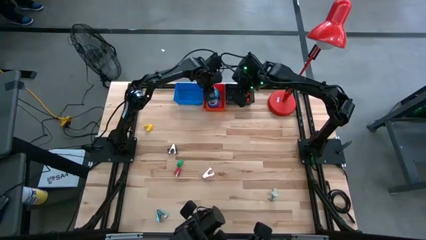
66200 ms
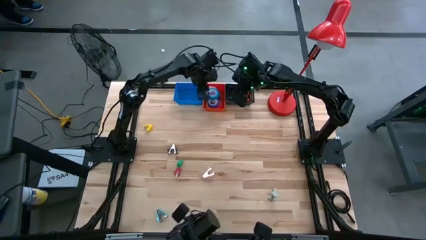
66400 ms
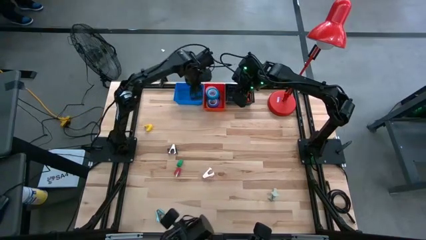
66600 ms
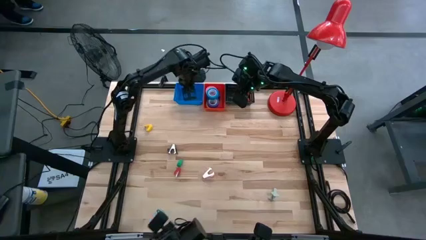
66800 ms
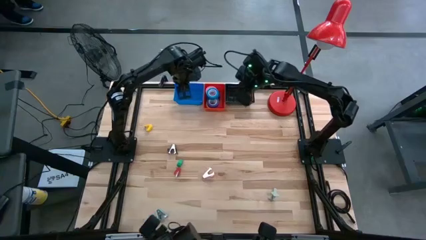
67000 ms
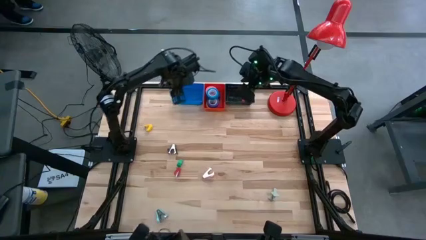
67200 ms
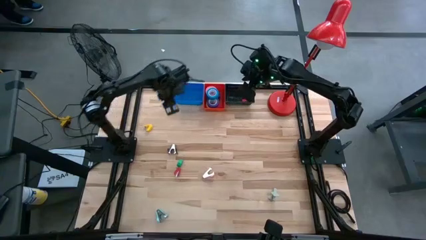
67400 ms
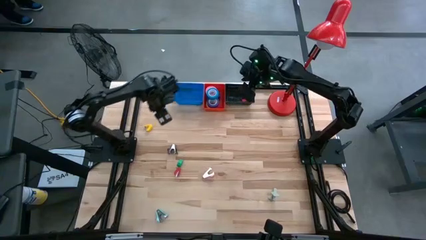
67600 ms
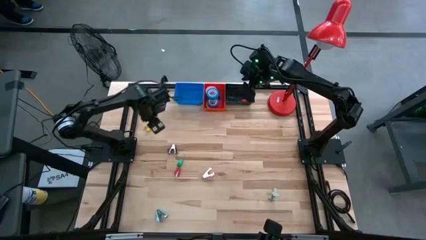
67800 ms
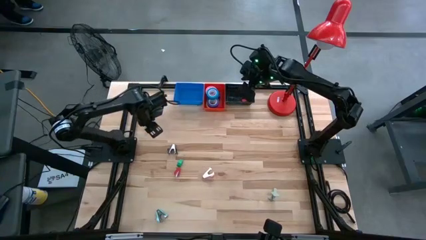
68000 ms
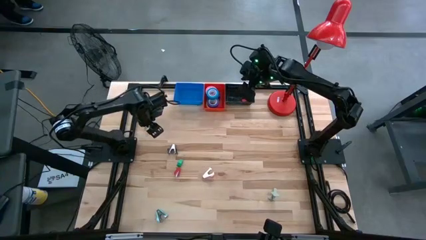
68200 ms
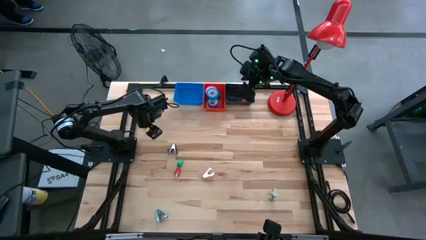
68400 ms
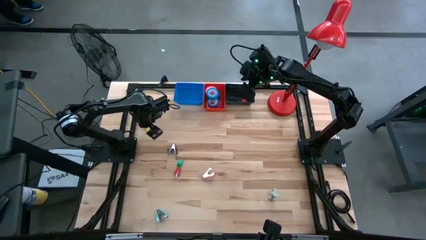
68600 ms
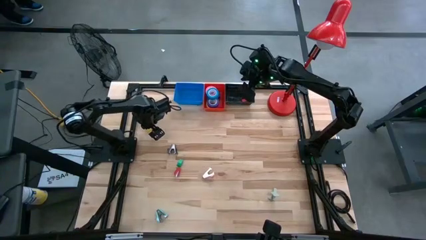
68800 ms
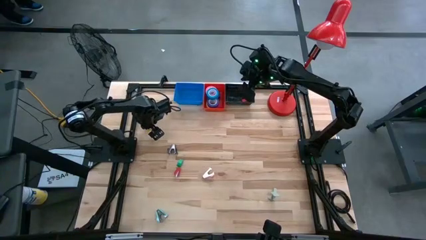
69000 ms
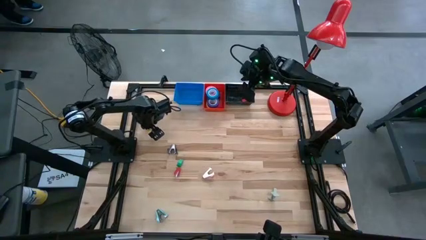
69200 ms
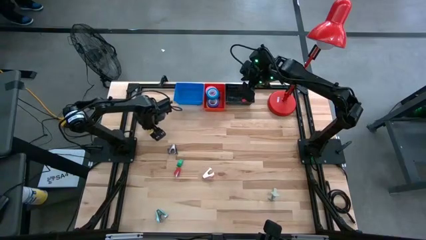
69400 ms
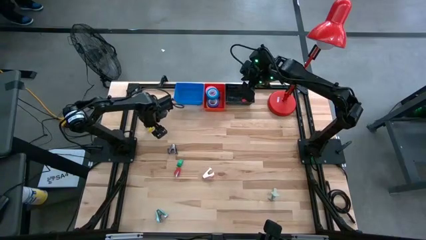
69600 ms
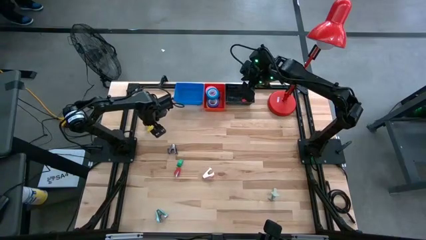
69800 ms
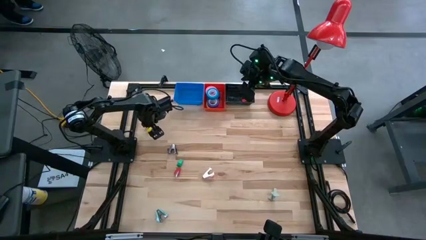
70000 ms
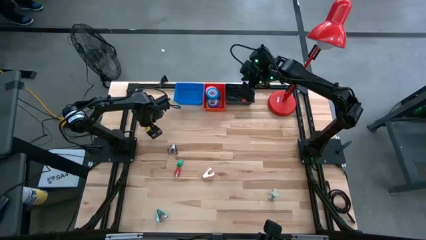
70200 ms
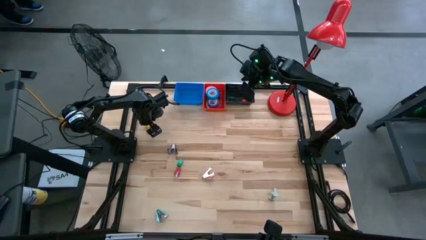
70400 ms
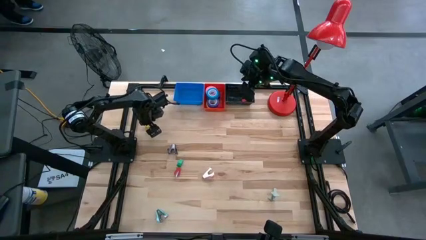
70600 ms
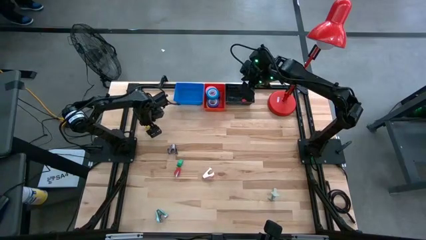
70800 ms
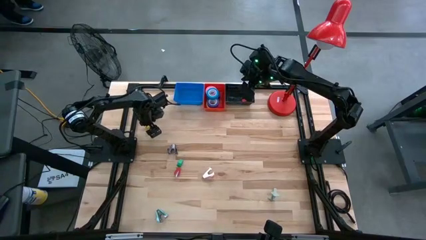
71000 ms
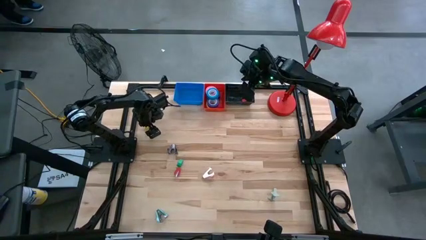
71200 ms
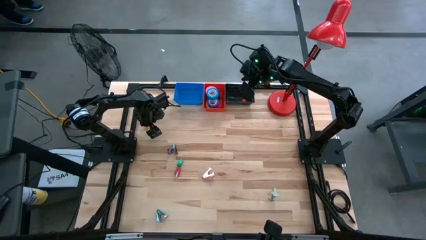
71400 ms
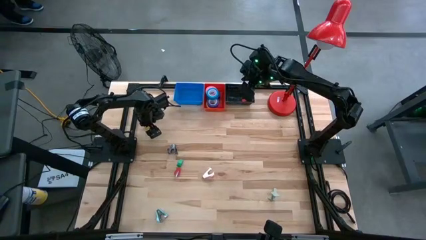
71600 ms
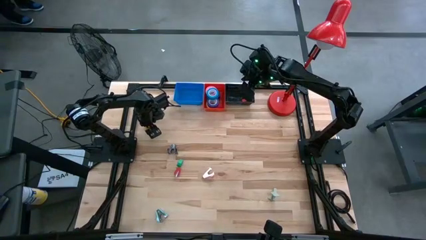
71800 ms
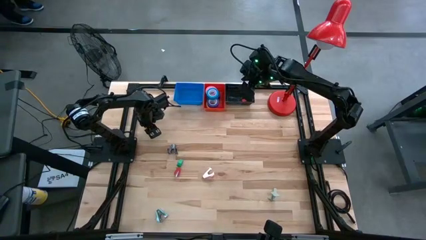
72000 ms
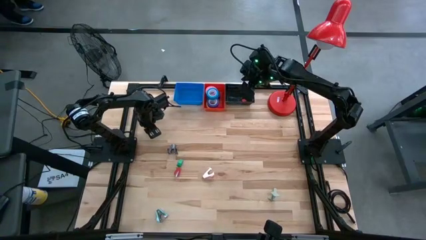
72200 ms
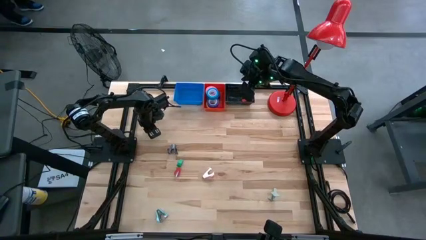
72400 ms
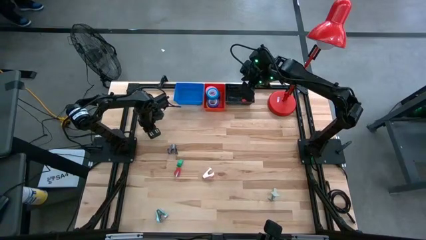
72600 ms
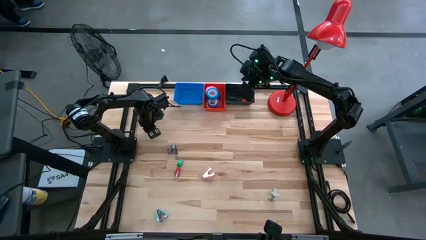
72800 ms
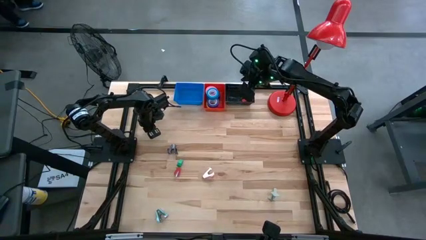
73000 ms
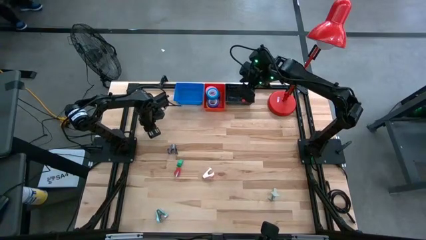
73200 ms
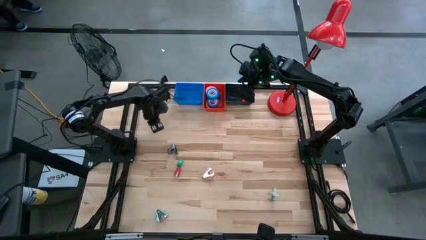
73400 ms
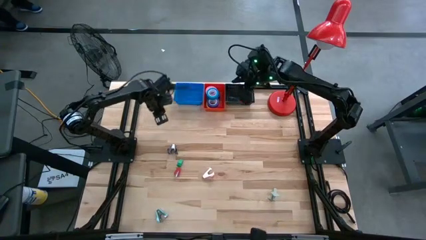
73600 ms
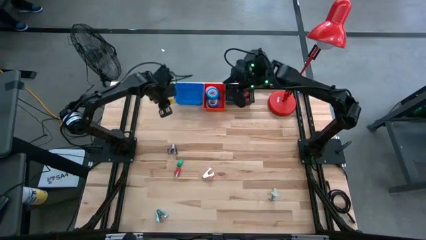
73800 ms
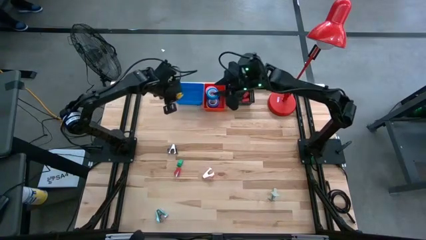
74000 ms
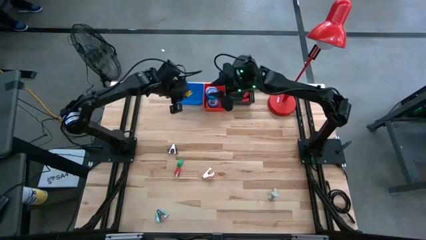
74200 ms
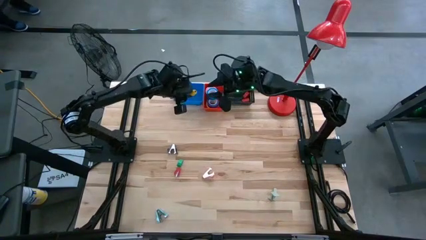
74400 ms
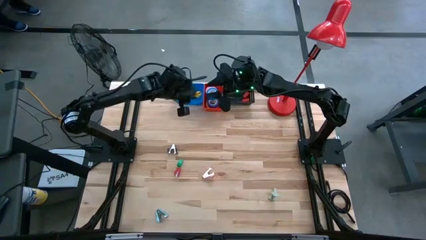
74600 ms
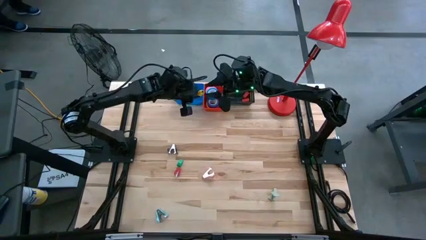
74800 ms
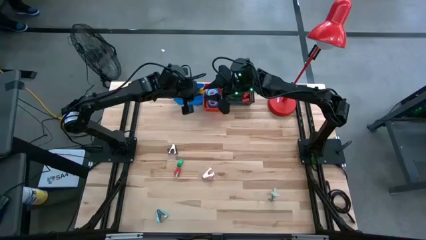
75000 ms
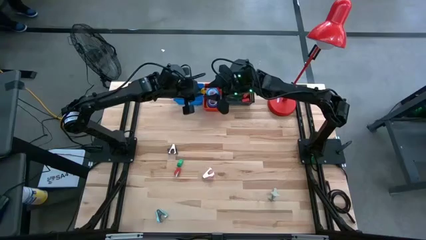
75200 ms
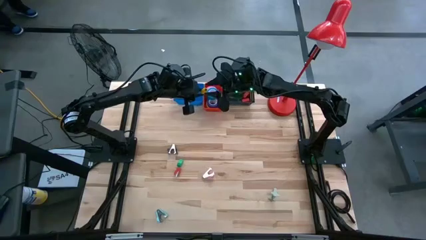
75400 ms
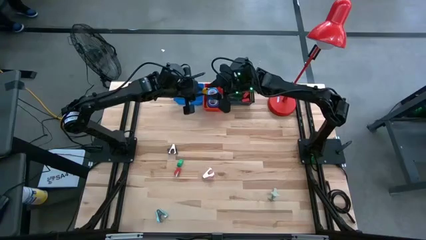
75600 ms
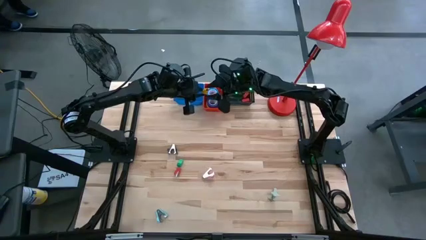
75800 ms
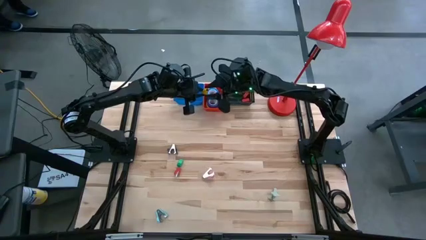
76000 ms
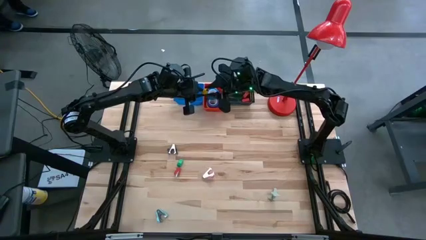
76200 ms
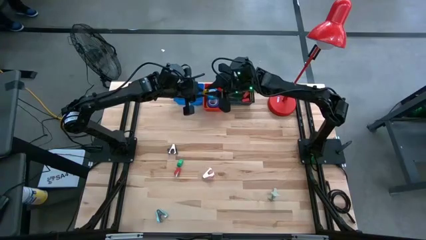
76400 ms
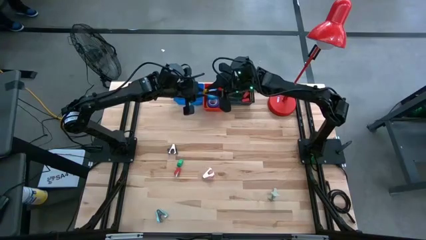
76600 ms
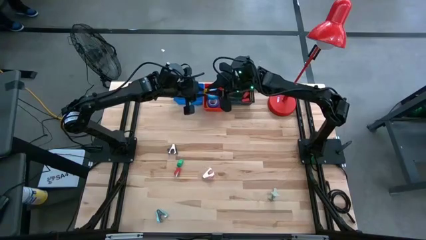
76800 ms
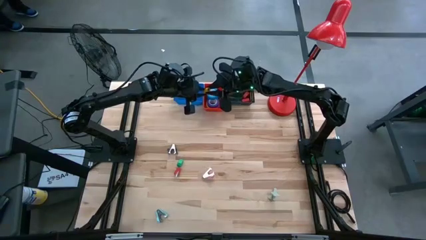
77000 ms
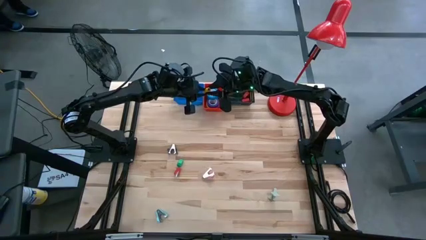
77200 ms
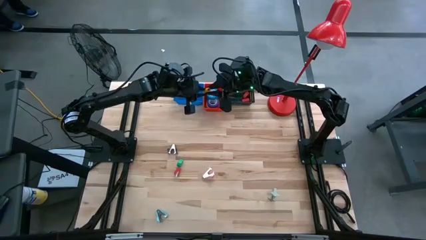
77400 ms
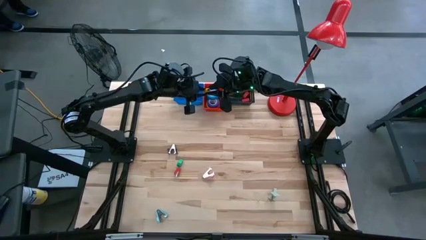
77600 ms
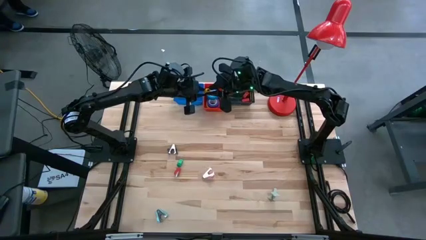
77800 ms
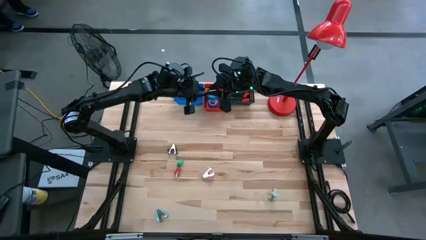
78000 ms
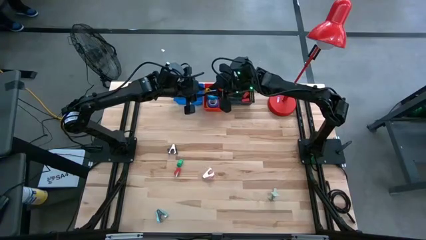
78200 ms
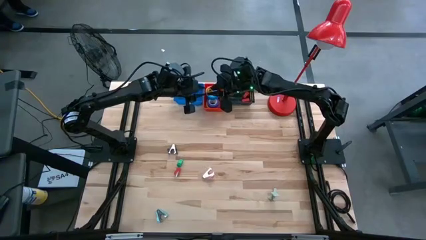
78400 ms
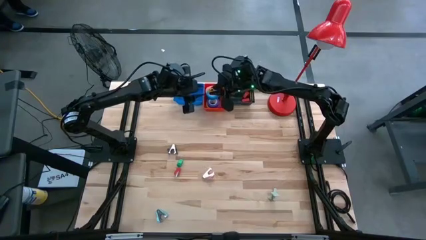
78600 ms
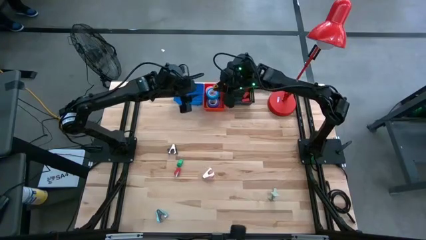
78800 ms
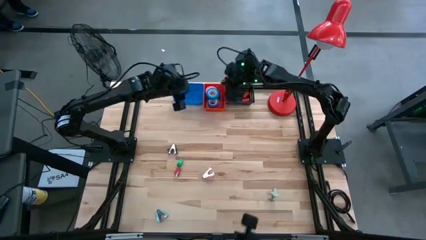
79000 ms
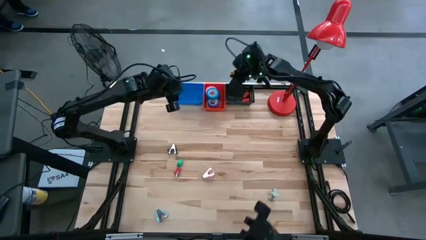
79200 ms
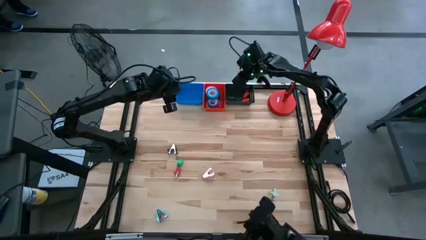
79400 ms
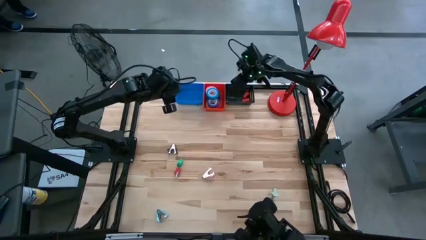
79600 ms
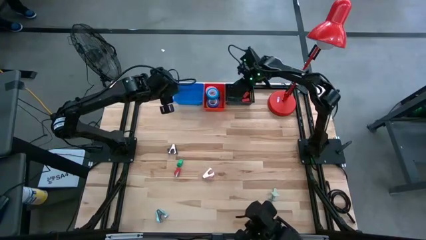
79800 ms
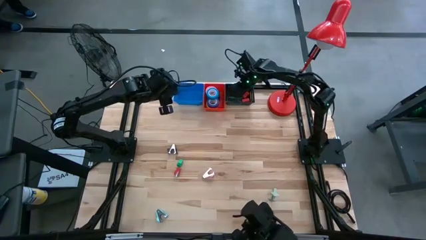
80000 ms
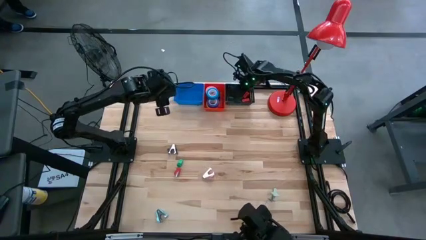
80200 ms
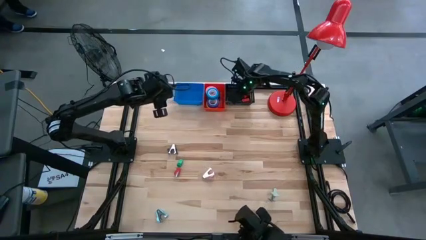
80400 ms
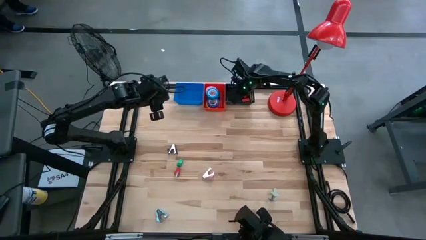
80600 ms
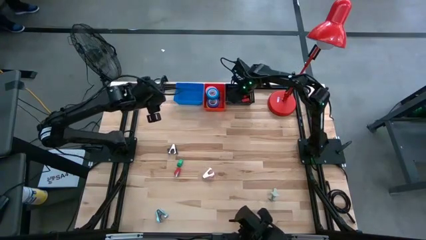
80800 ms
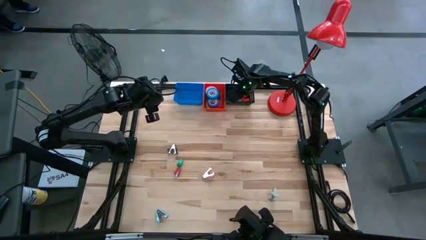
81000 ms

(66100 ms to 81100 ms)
Task: Pick and place Stapler, Stapler remover, tape
Put the yellow stapler into the black basket
